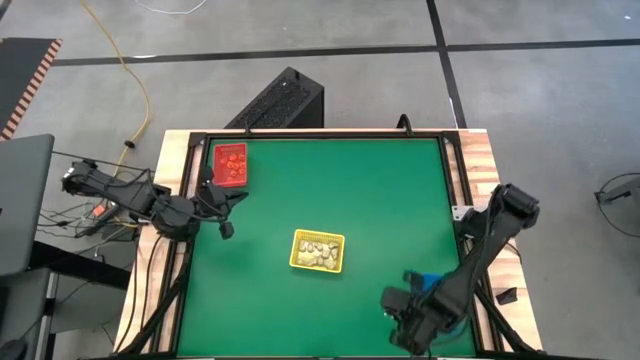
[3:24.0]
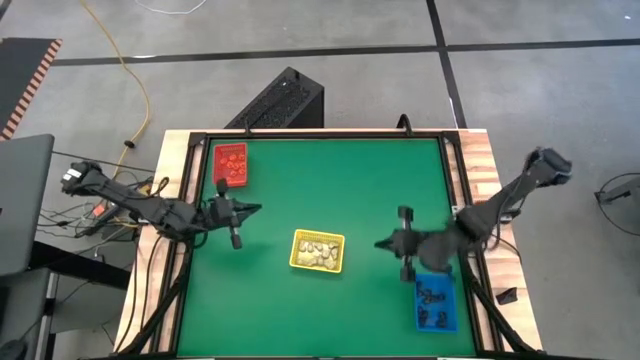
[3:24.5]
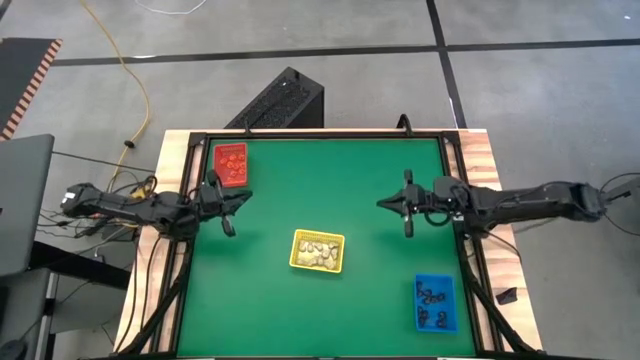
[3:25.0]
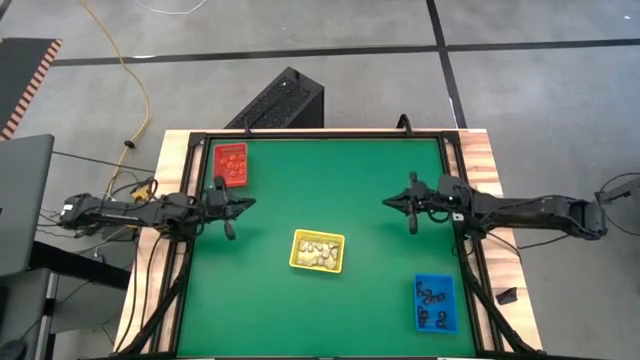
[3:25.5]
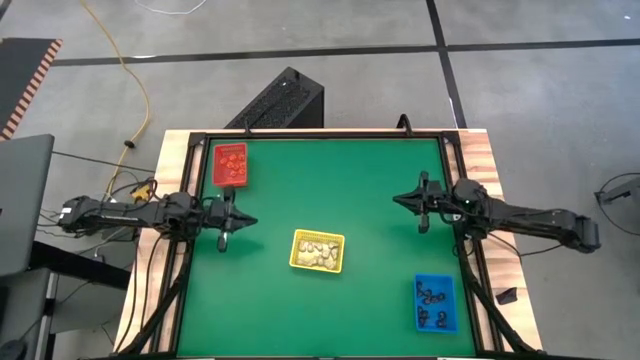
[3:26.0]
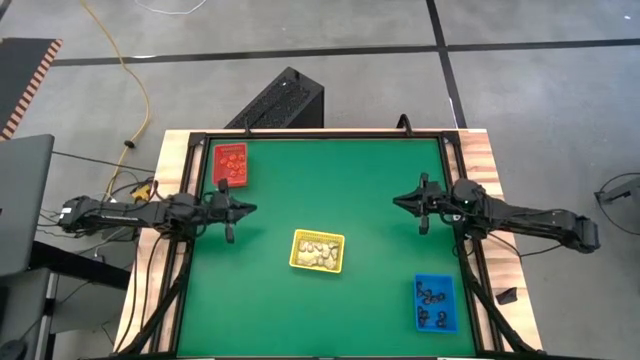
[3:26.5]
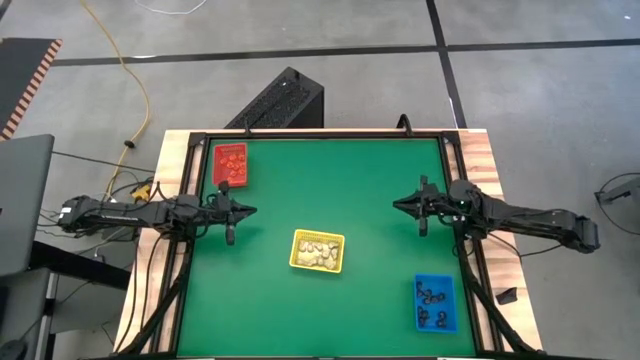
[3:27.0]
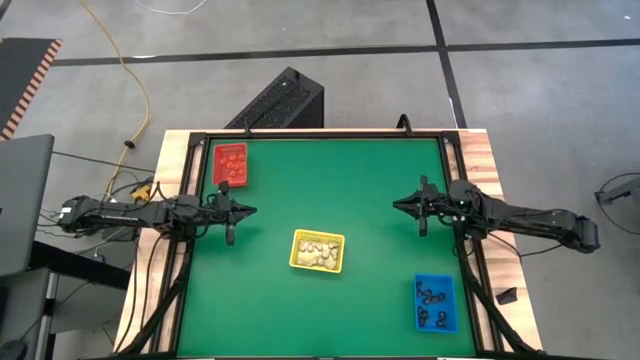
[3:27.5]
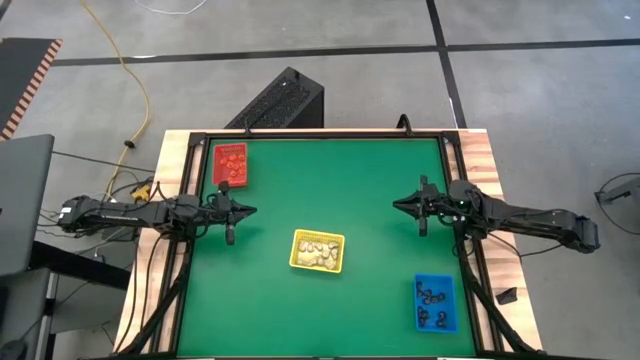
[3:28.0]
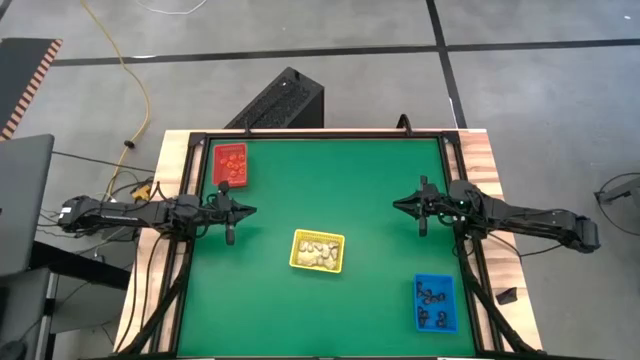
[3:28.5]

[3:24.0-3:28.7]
Task: Sort Halloween decoration
Return to Home Position

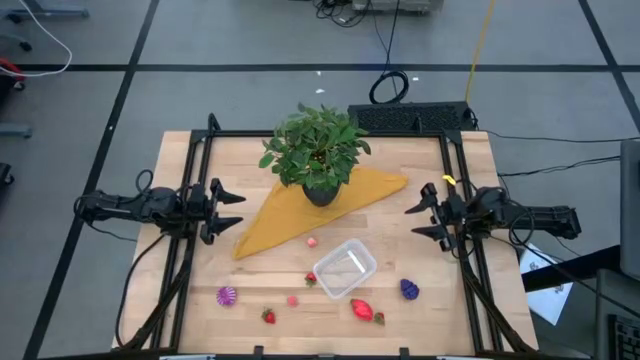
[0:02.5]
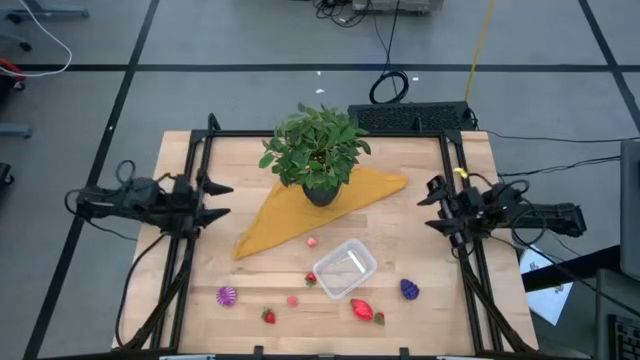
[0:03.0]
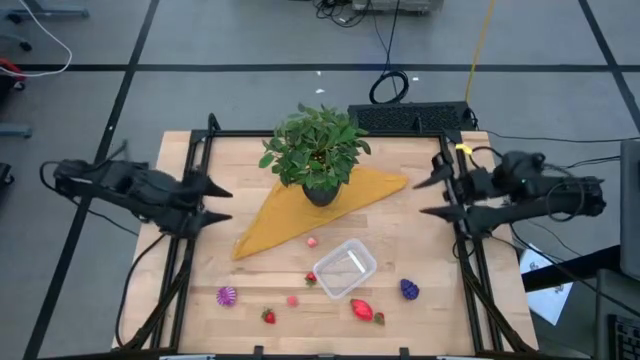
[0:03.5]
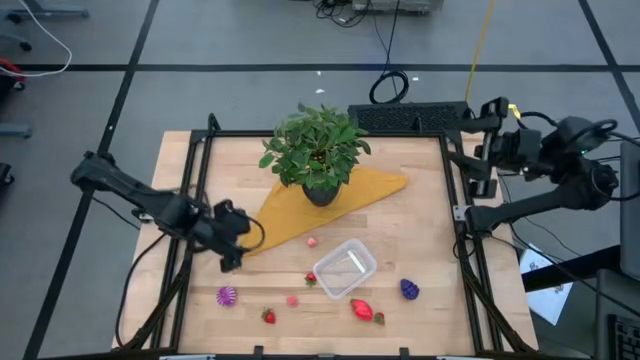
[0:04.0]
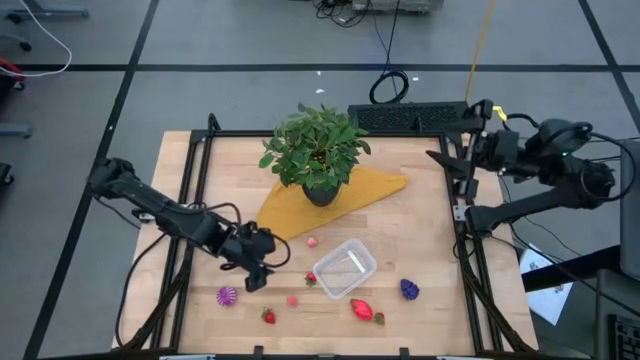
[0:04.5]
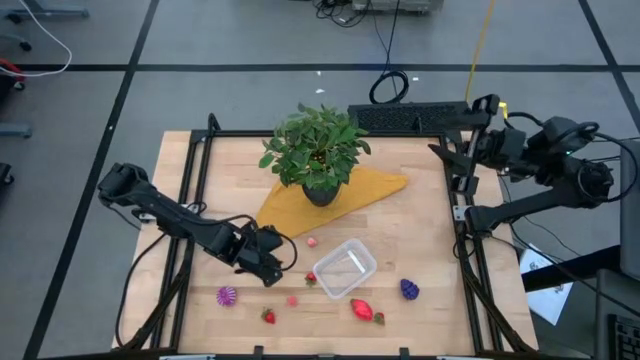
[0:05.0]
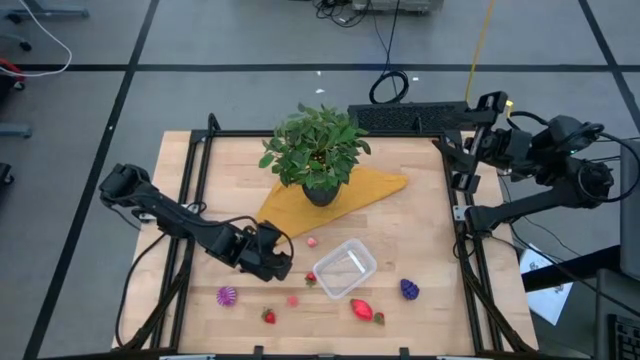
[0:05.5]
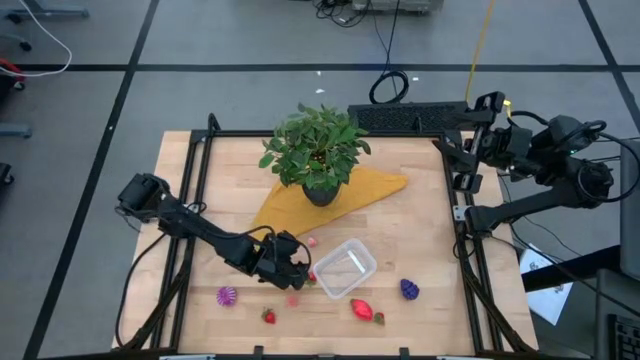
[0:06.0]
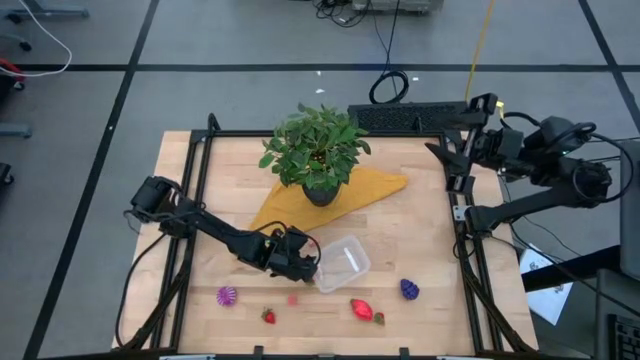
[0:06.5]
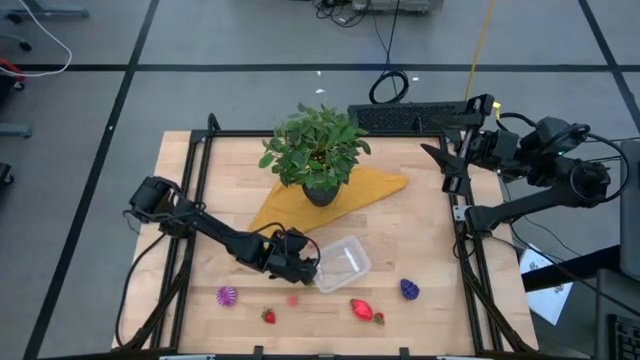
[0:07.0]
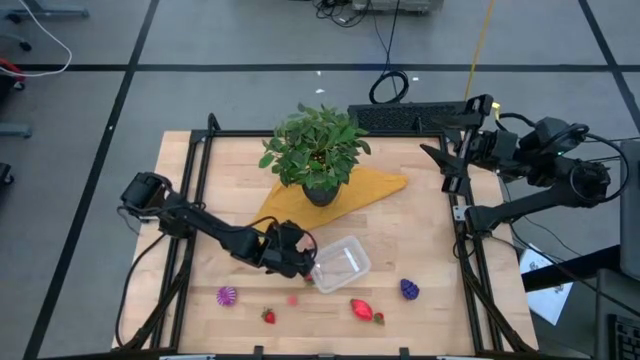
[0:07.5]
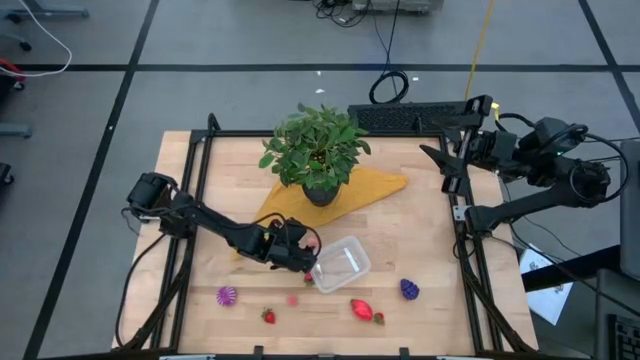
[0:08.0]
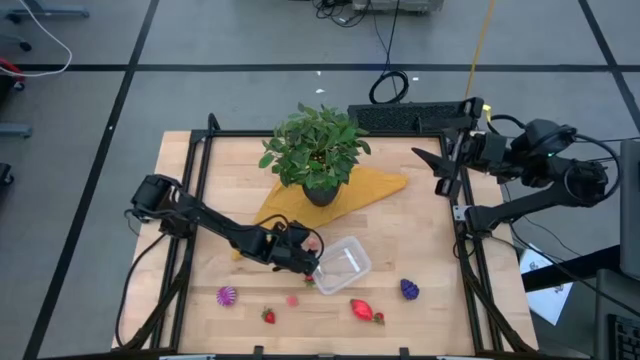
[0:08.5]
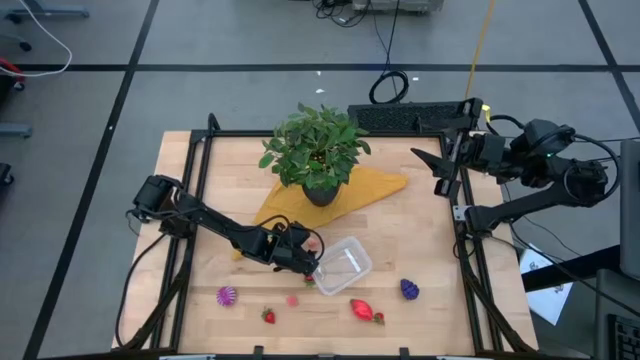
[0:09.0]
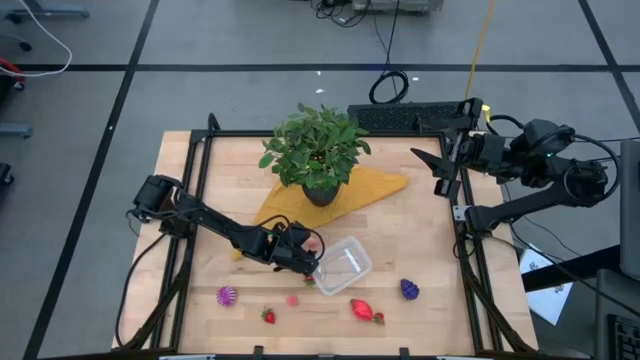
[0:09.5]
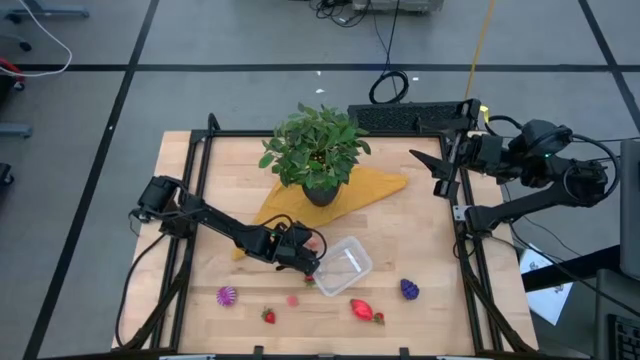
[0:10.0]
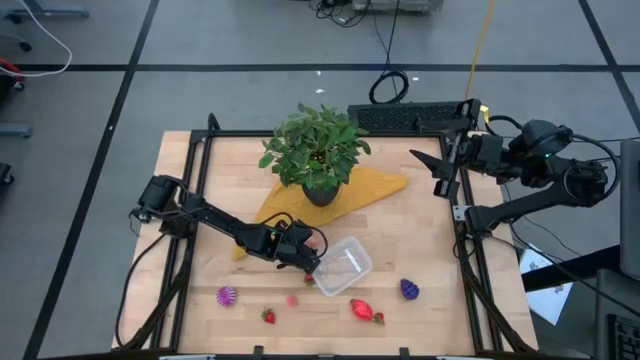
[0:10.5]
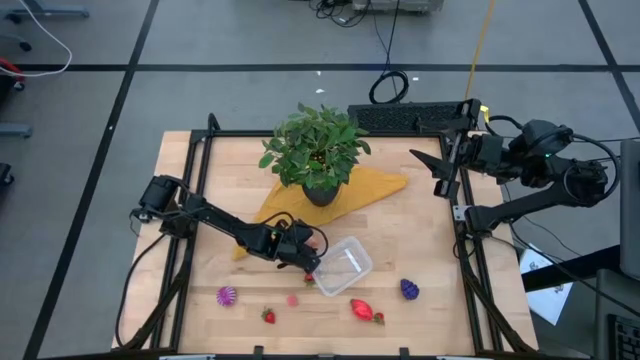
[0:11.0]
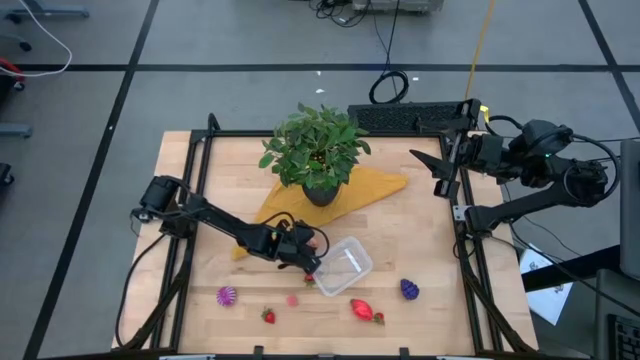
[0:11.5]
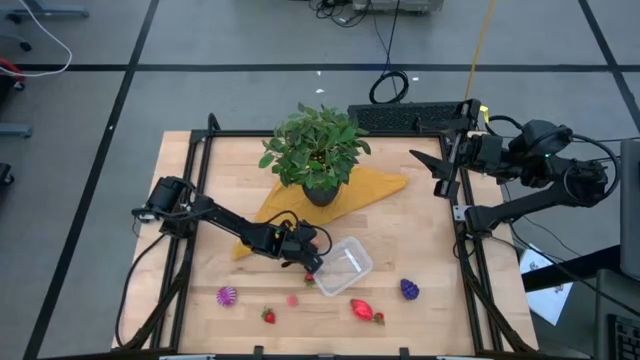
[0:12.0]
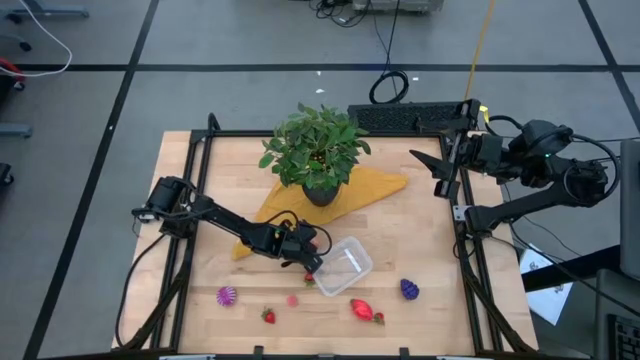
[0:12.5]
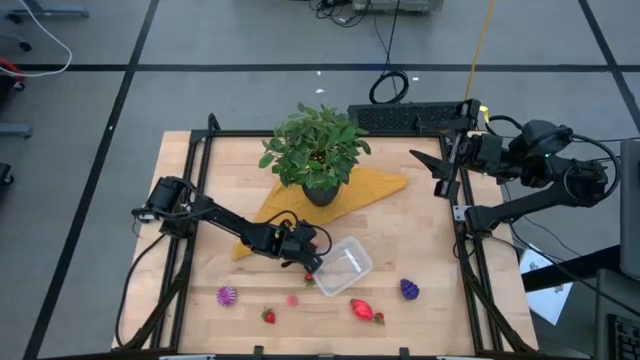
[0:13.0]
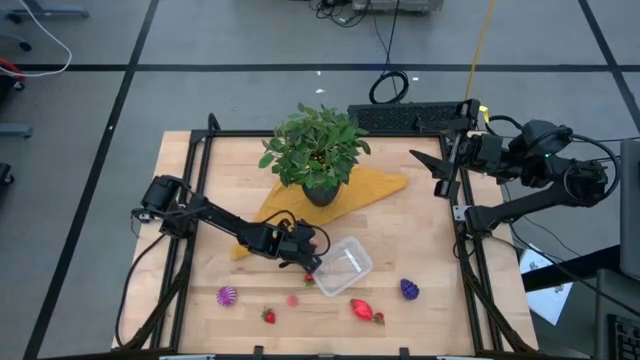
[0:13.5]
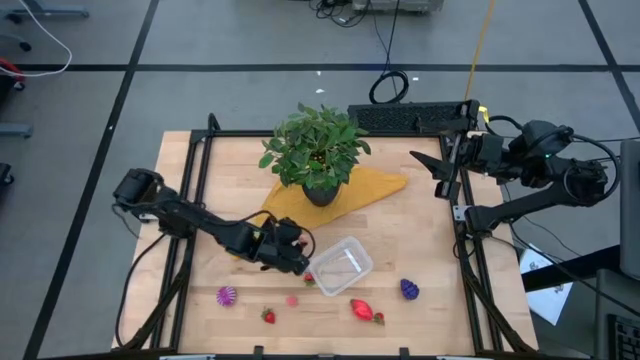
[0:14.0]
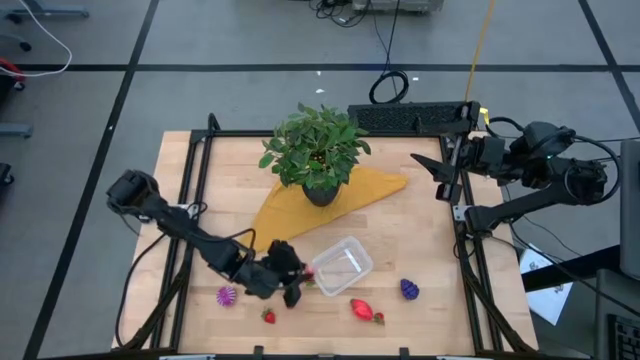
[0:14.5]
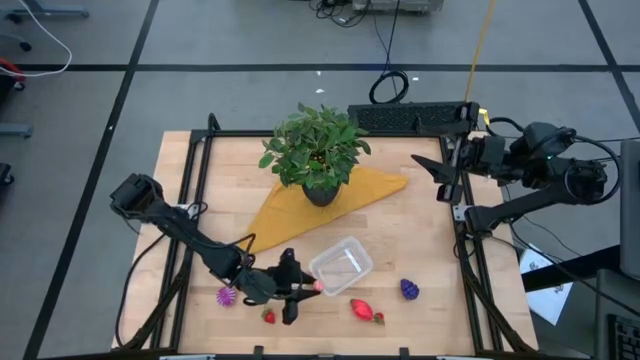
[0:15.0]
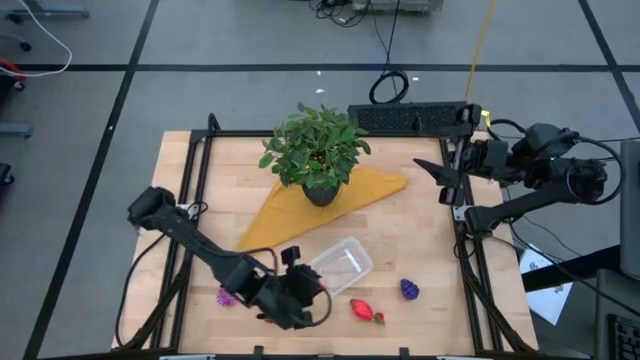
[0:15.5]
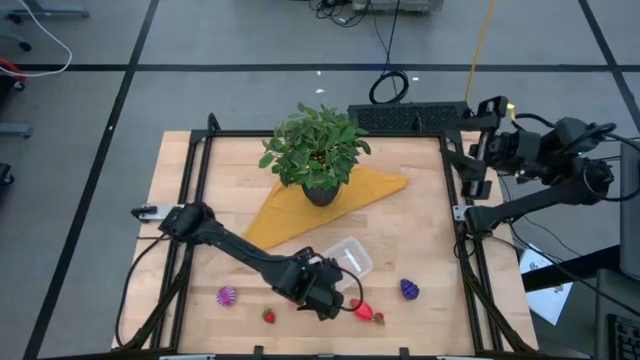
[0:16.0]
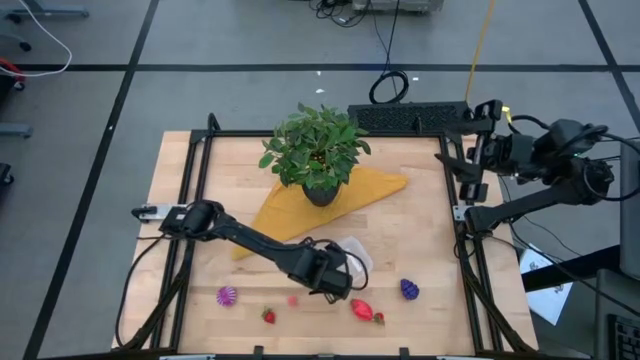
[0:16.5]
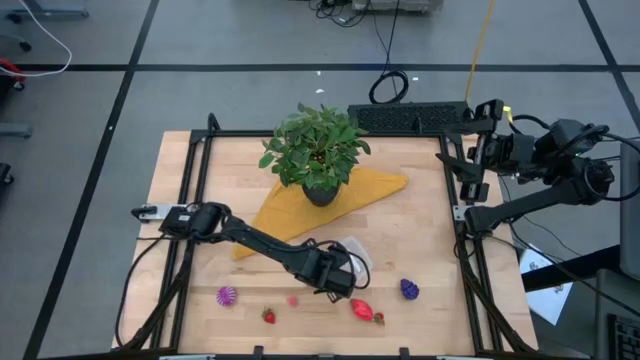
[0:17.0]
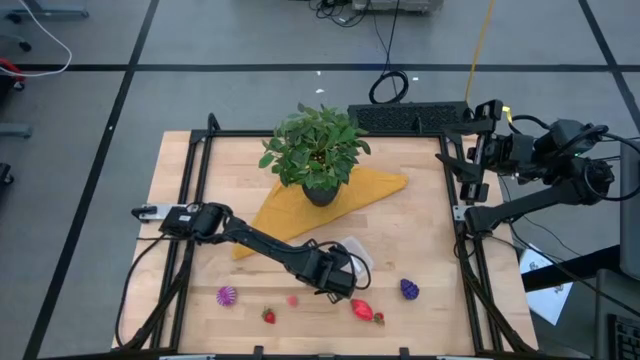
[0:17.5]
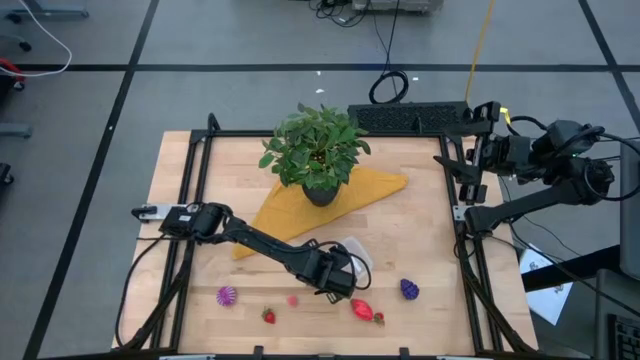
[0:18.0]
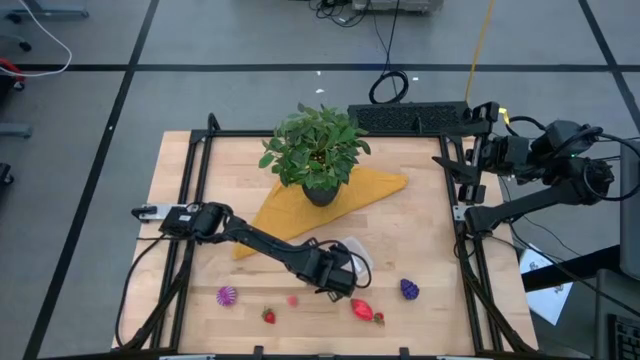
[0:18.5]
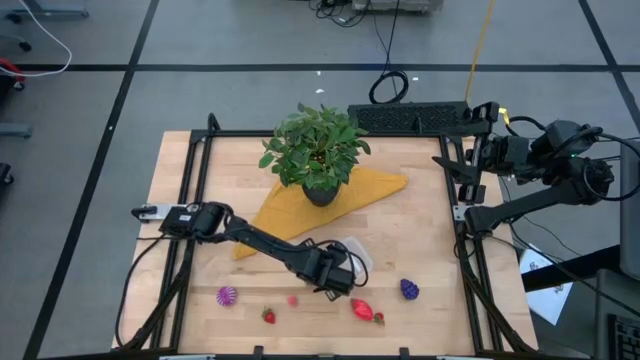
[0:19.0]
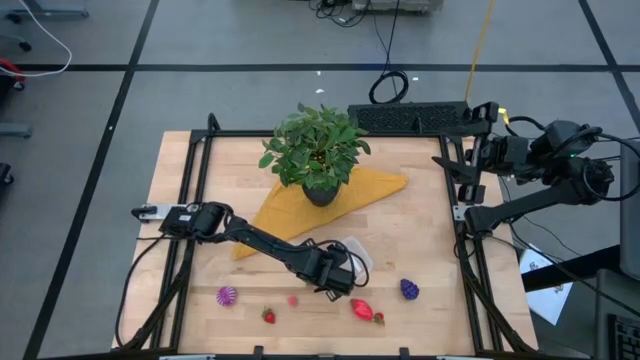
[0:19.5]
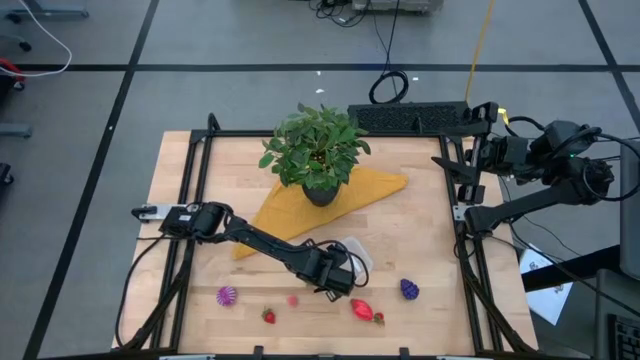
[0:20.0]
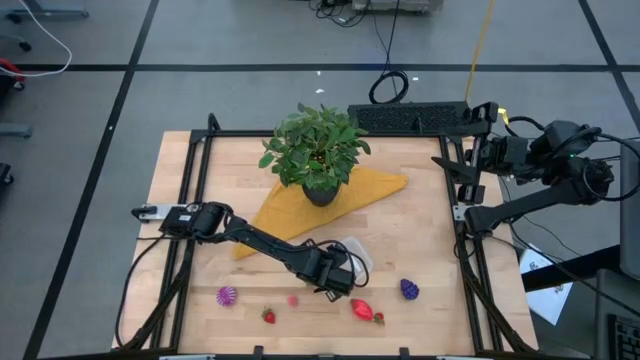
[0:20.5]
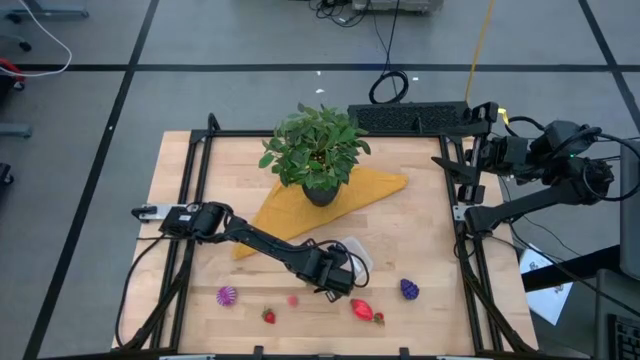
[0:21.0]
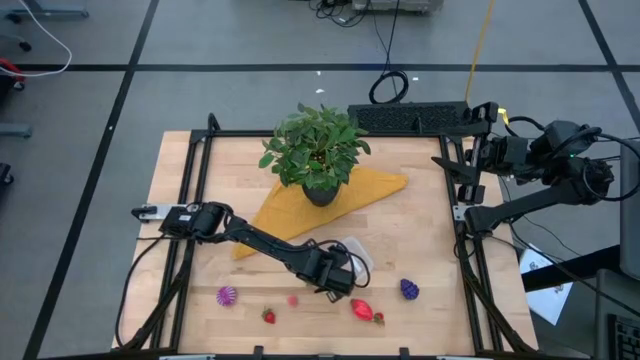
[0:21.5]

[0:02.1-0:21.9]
Task: Pick and placing Produce into tupperware
Put the top lychee into the transparent bin
